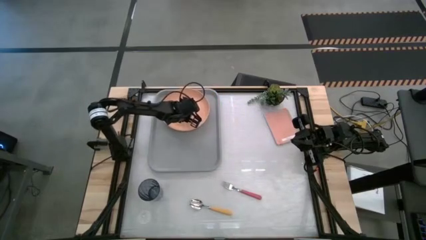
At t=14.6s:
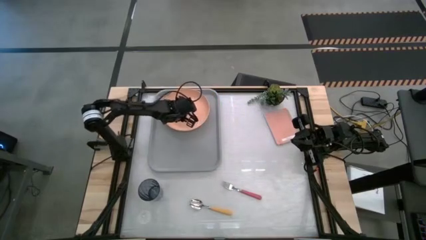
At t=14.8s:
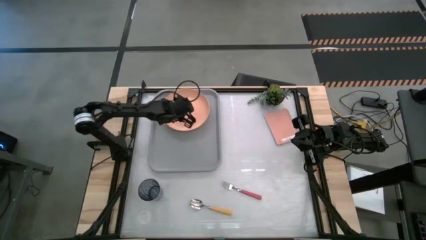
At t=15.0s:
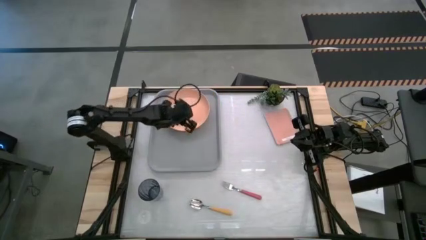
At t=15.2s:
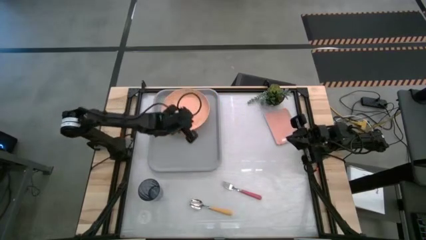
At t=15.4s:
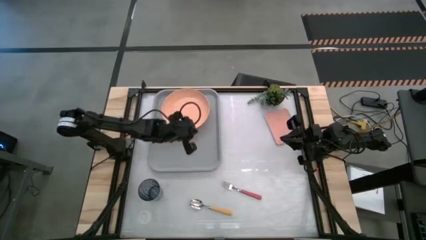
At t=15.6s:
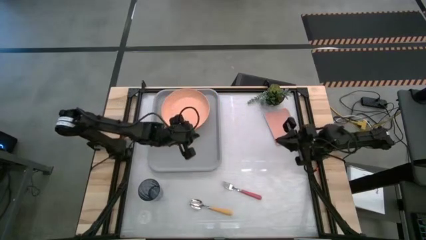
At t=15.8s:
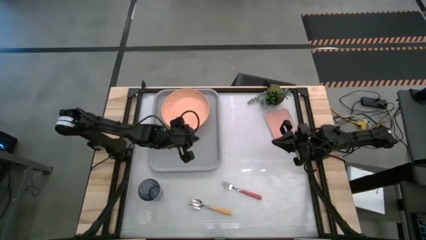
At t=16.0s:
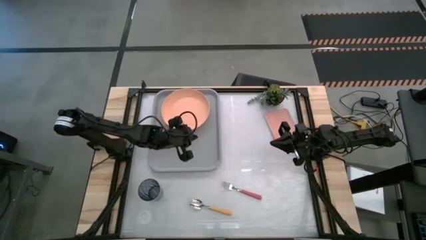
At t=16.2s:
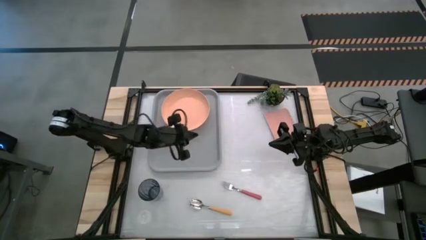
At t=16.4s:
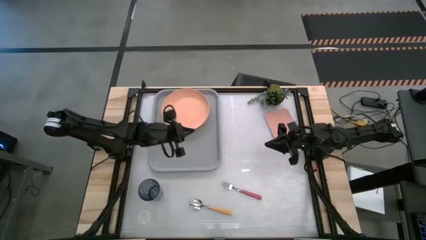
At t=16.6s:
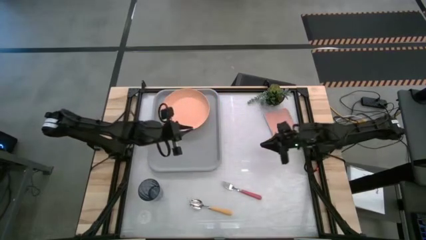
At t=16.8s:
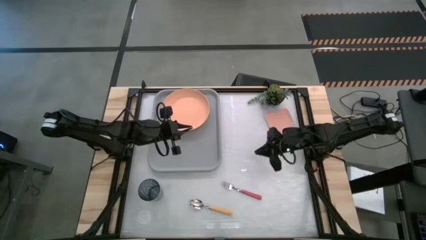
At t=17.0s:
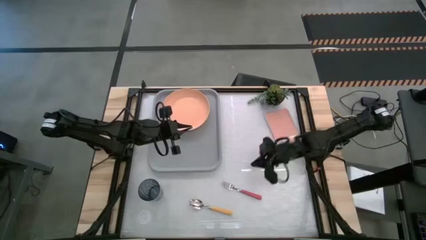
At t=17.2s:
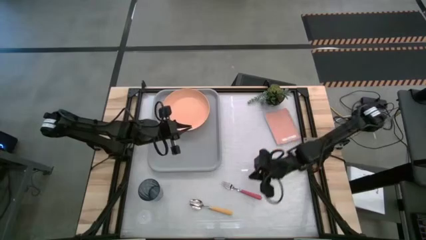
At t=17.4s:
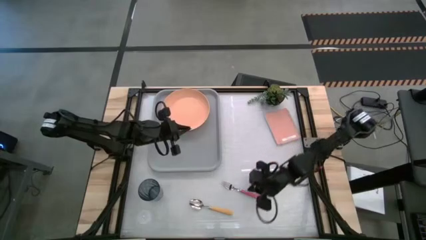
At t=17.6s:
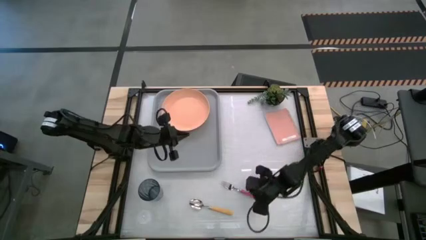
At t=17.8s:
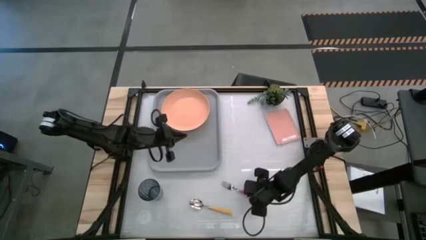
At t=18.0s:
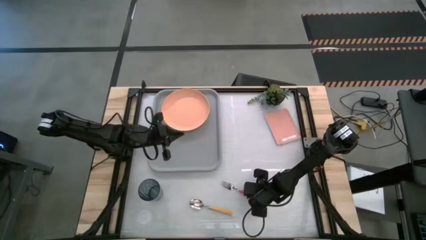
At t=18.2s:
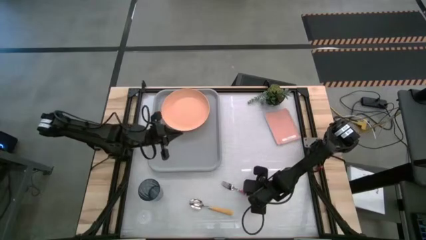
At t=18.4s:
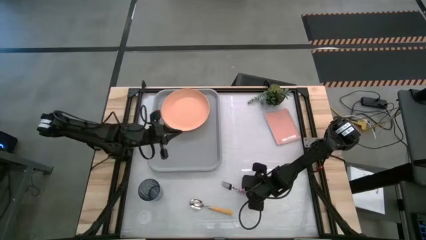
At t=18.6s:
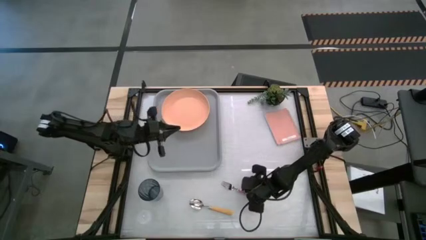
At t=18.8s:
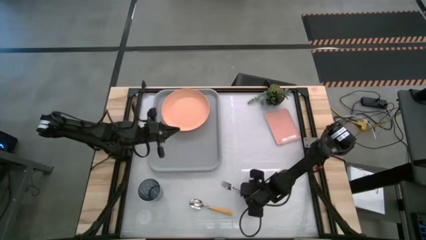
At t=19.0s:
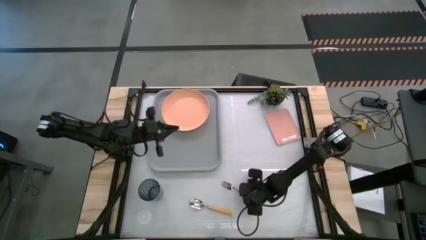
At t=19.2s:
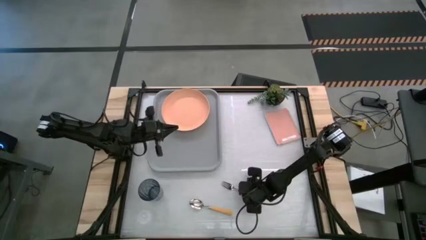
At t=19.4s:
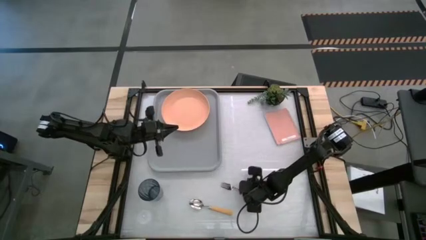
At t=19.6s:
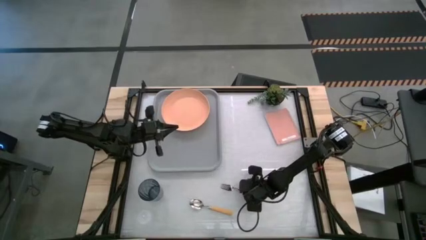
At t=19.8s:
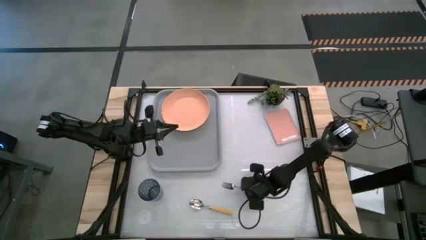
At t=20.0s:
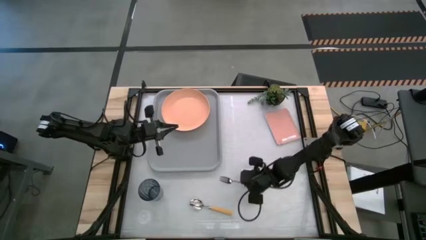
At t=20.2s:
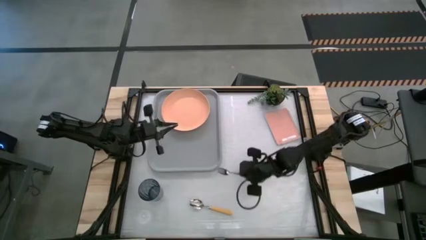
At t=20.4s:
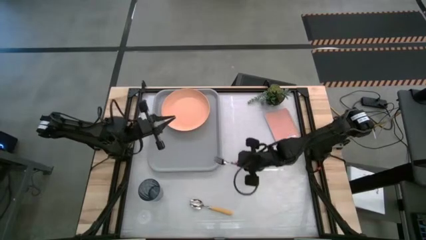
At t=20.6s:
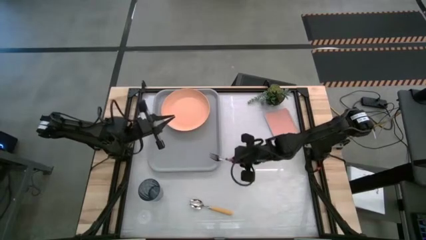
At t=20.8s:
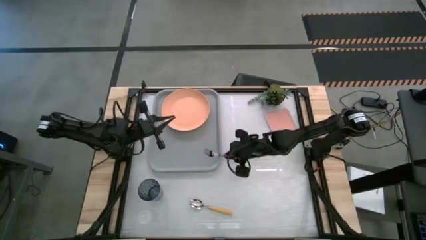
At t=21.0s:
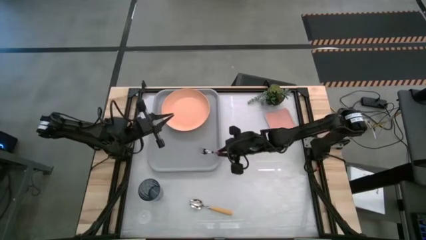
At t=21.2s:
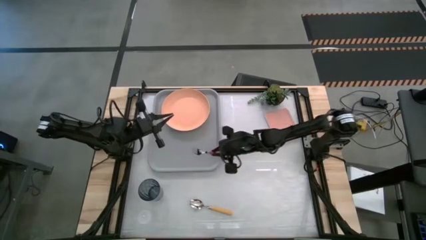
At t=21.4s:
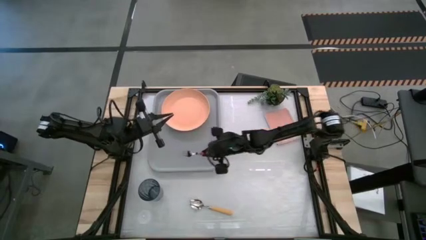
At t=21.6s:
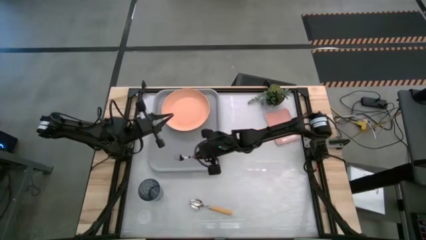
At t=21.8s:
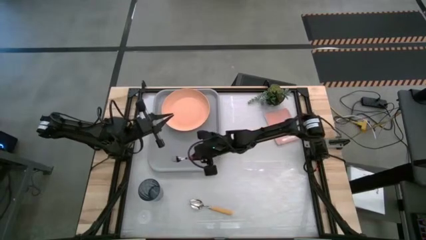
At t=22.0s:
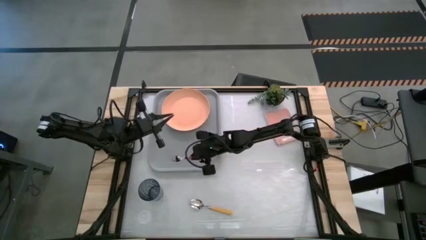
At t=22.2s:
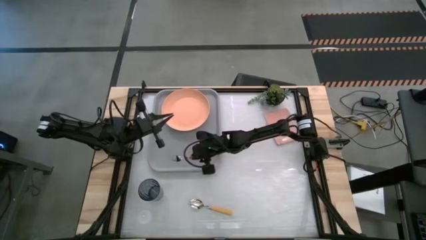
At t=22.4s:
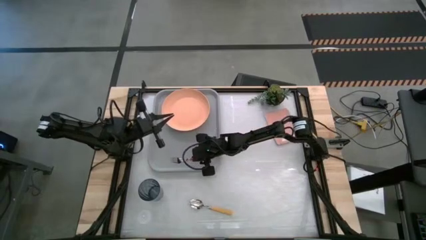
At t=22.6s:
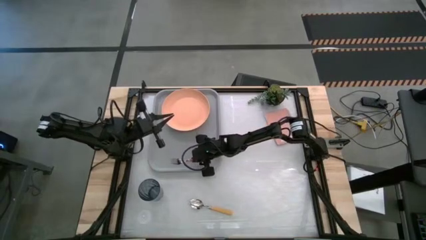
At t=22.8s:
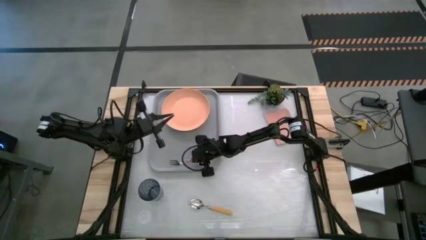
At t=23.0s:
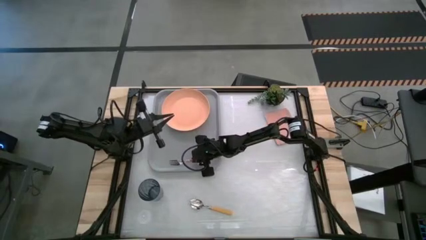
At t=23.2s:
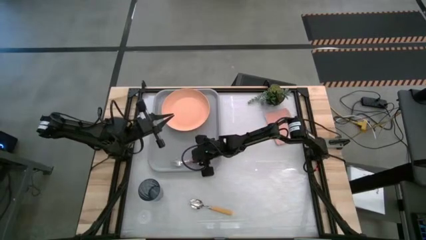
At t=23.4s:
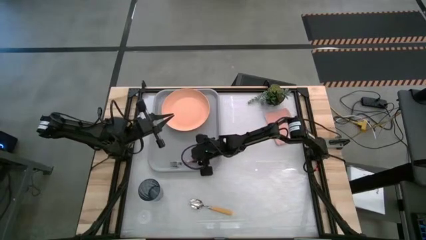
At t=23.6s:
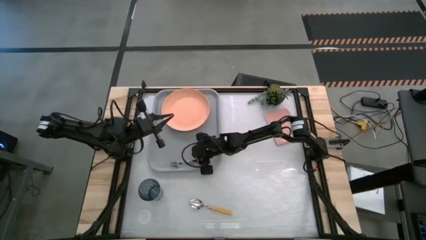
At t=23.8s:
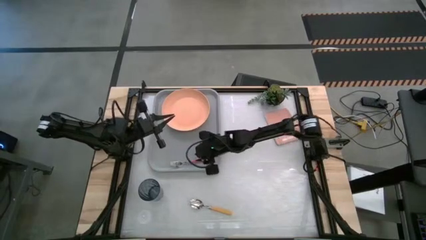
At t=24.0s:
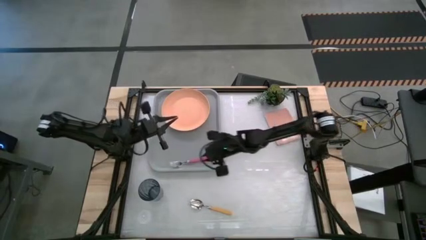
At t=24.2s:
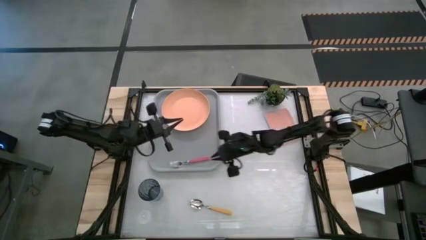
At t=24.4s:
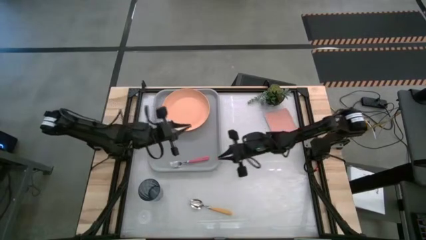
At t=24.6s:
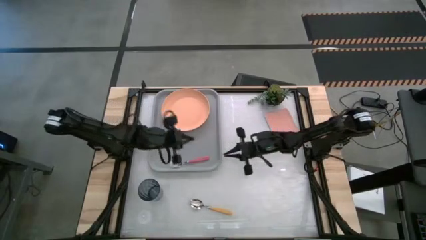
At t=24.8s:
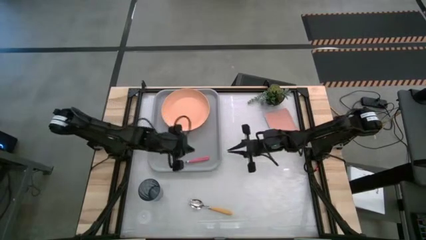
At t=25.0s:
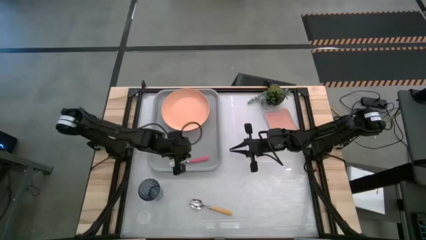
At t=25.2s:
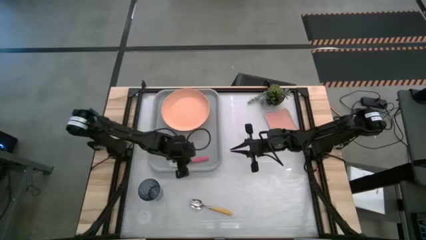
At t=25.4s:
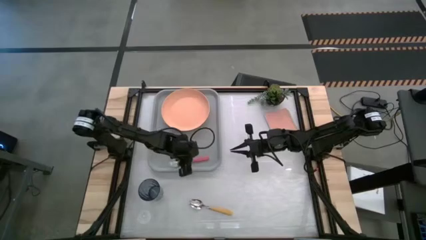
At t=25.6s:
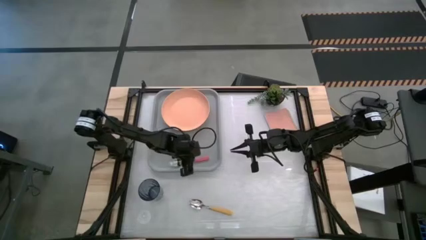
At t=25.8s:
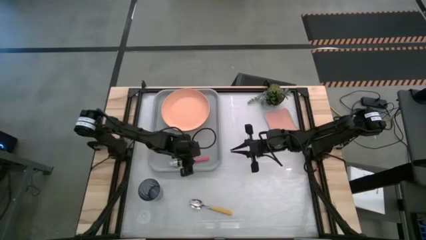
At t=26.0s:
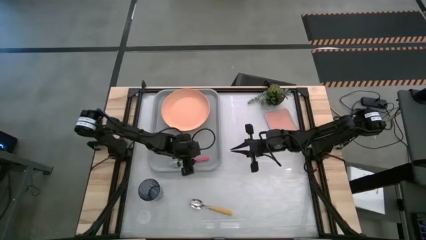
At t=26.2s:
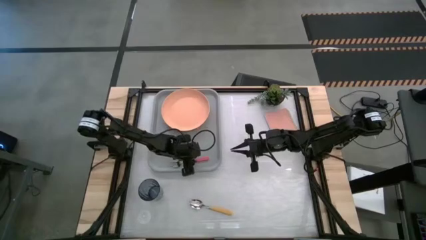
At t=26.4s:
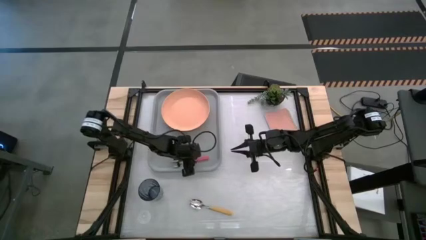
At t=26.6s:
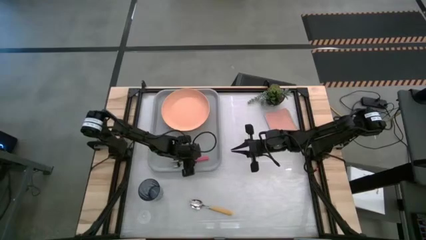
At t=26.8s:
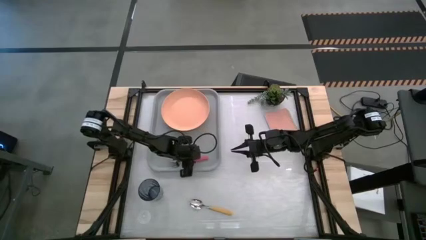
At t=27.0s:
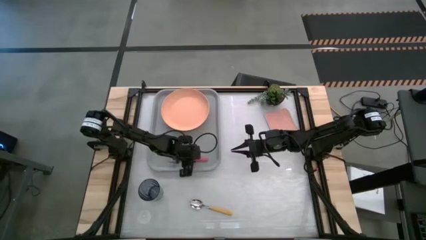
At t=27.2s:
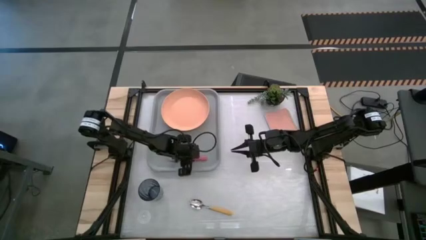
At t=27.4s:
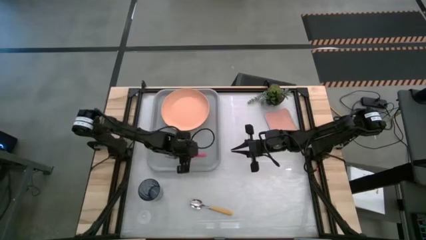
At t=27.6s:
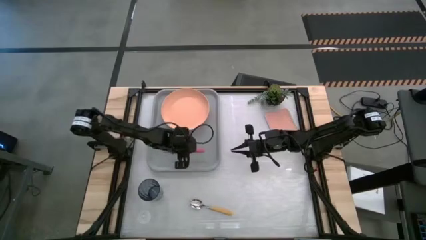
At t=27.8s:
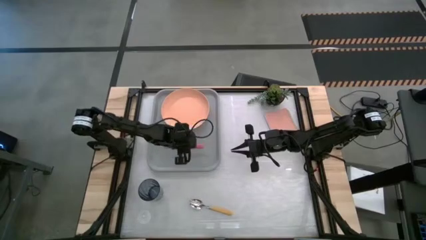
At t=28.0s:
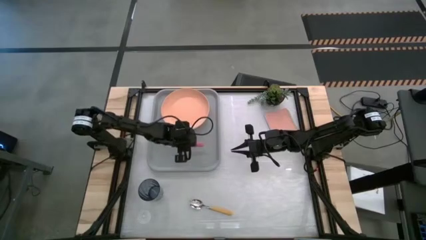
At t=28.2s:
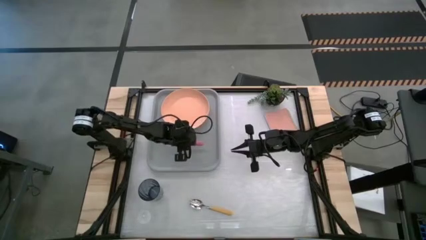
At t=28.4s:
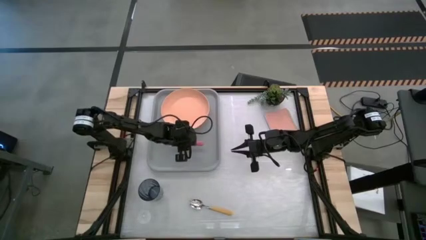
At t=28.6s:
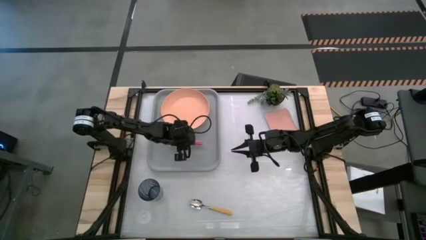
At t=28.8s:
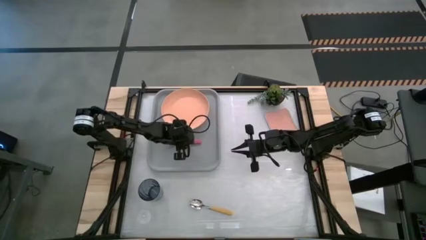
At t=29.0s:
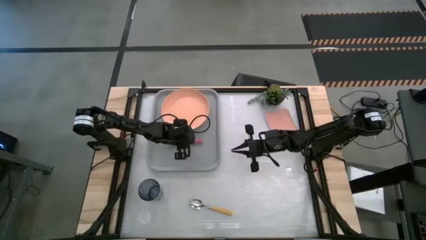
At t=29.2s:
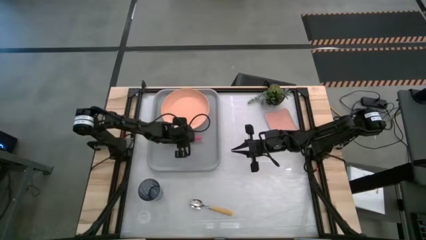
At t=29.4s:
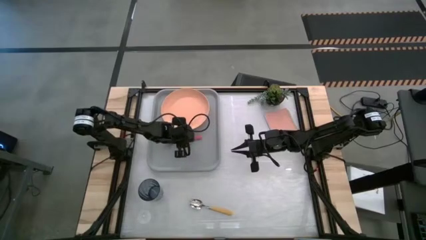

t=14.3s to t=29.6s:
Task: Pick and place plate/cup/fork/spoon on tray
Put the pink fork on the gray serving tray to the left of the orange plate
